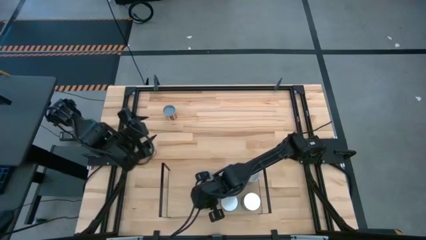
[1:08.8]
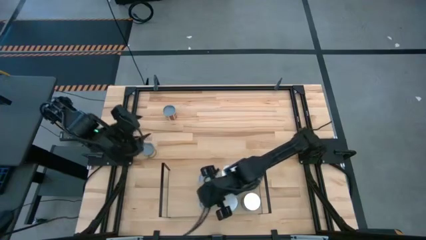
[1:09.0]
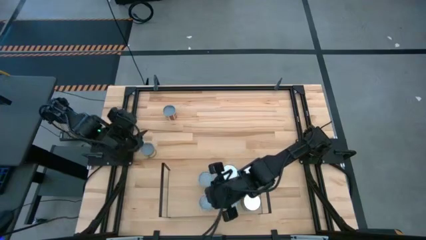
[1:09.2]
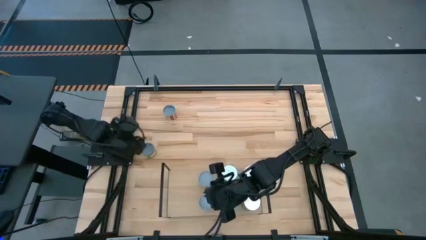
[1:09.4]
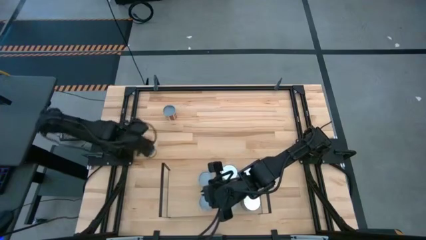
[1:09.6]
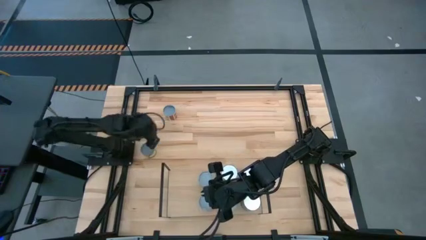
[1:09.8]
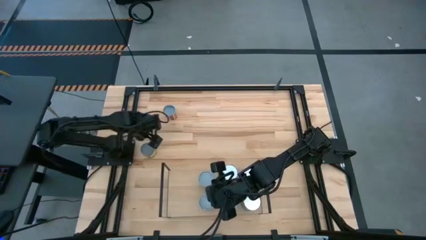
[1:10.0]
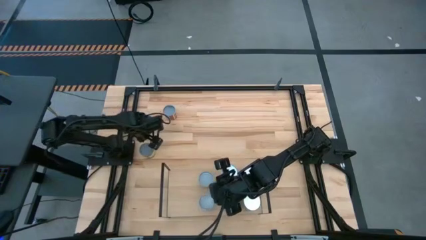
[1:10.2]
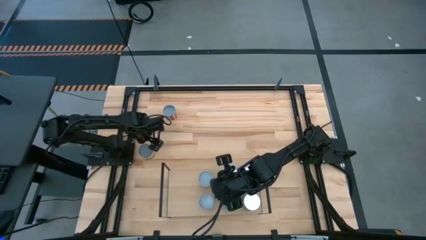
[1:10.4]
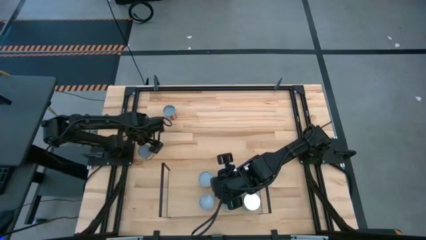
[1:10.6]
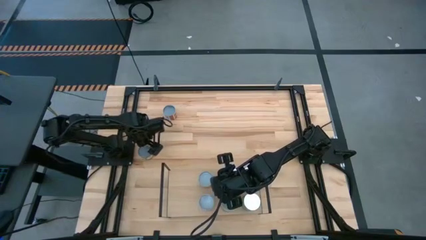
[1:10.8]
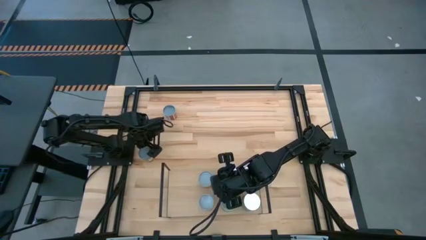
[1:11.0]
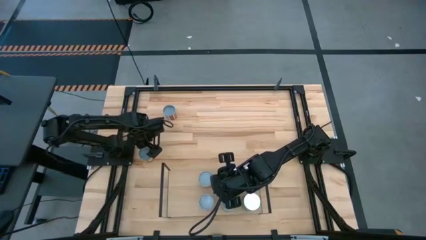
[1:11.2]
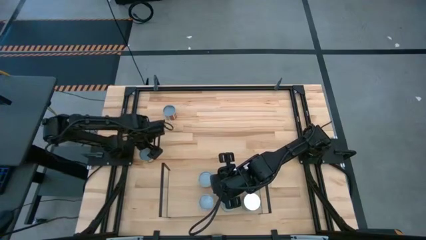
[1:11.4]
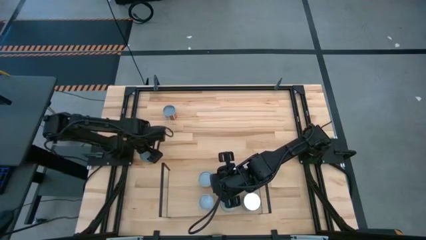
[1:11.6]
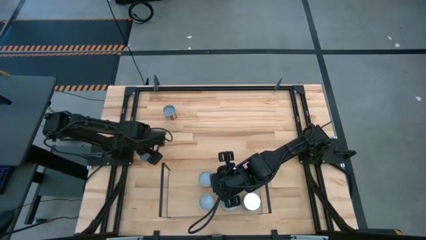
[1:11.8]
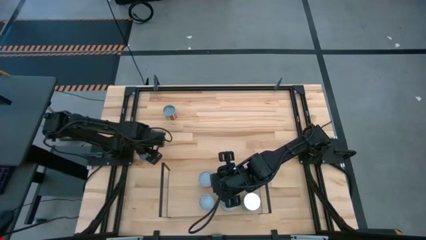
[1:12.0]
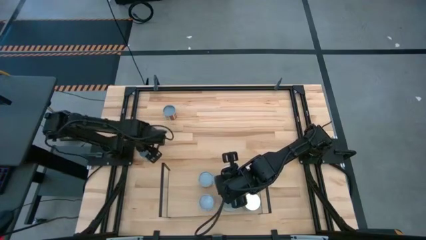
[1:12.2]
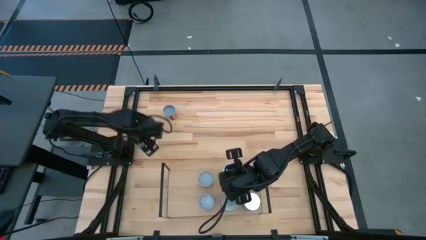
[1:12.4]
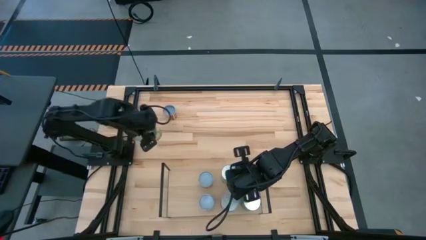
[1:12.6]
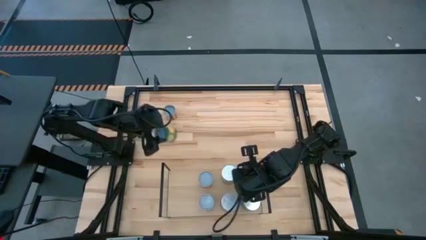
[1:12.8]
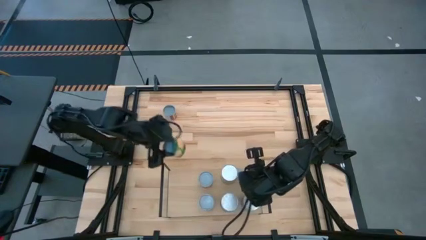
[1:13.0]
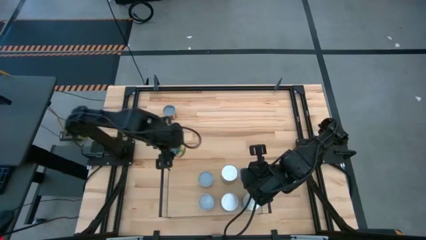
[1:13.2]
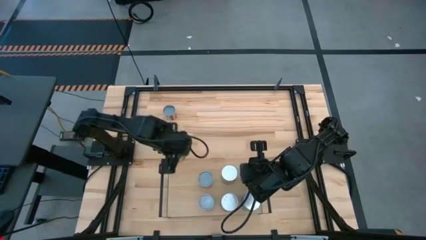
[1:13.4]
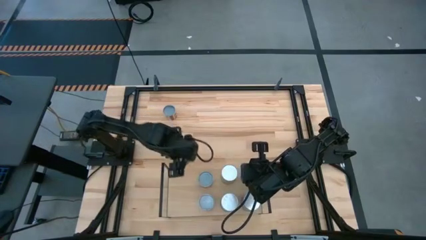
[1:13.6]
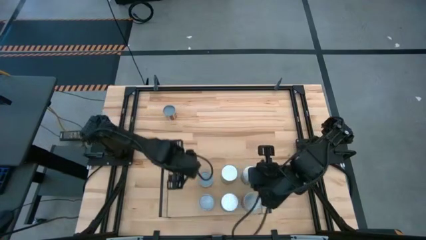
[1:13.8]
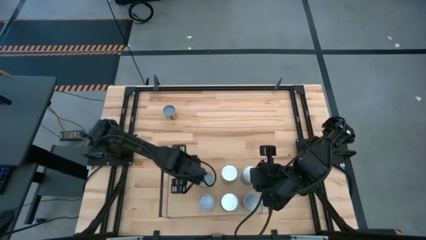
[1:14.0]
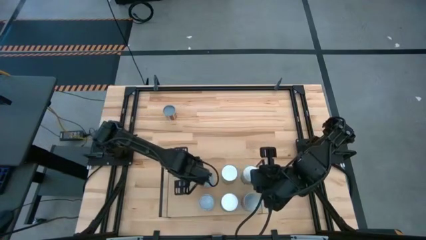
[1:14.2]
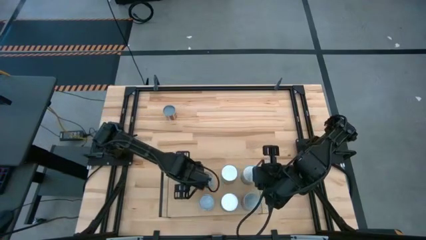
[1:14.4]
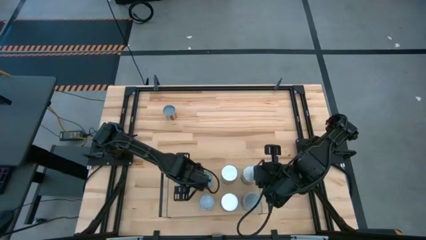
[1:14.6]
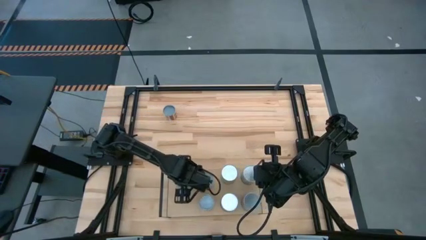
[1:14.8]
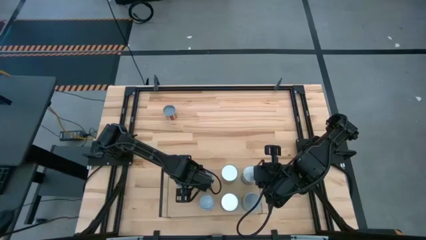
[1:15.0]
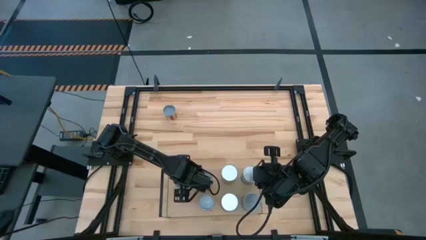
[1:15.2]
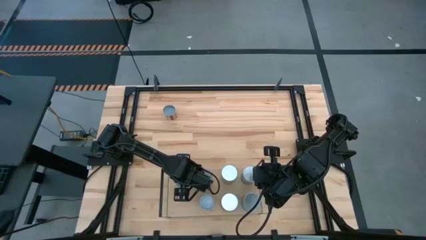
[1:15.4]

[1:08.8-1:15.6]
Task: Pick and place cans onto a shelf
Put the canned sliced peaches on the shelf

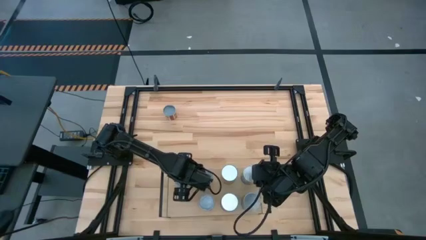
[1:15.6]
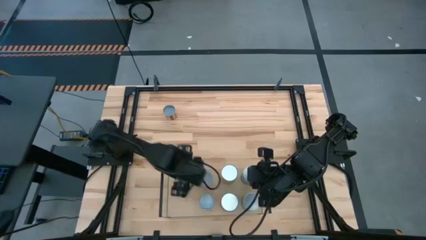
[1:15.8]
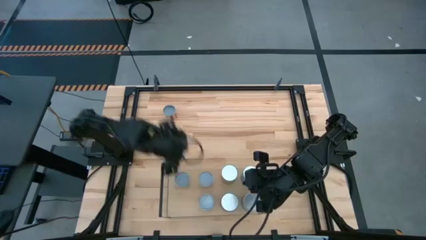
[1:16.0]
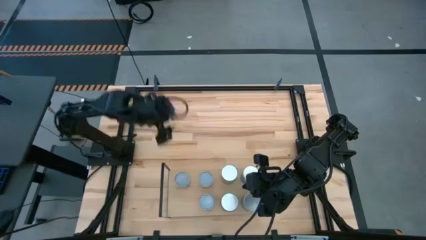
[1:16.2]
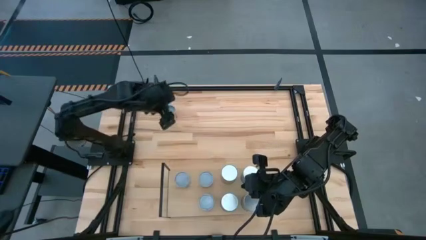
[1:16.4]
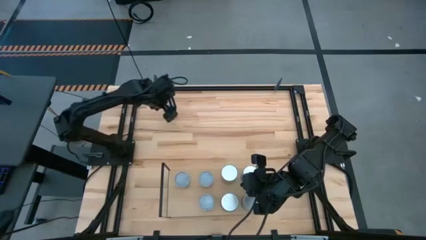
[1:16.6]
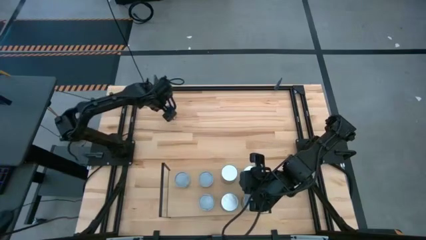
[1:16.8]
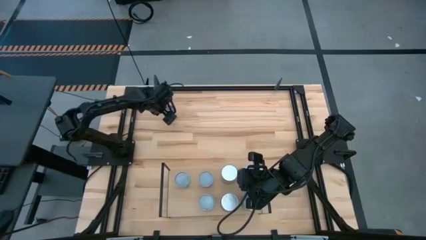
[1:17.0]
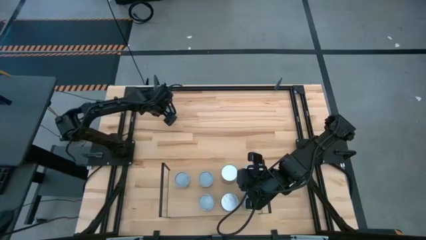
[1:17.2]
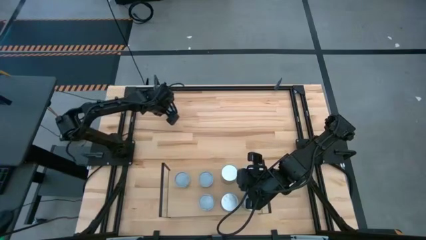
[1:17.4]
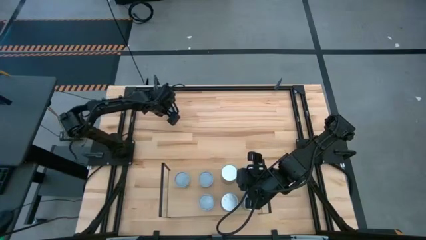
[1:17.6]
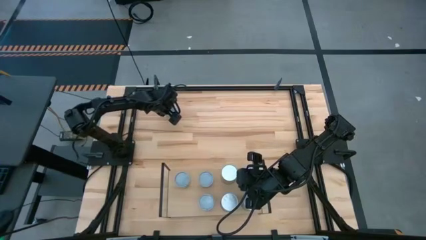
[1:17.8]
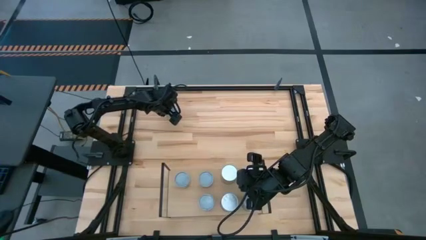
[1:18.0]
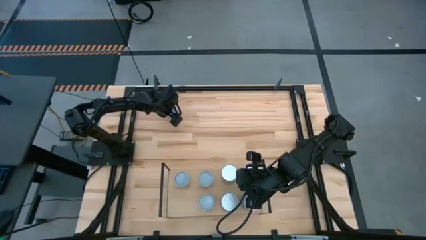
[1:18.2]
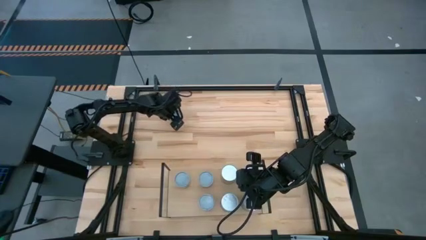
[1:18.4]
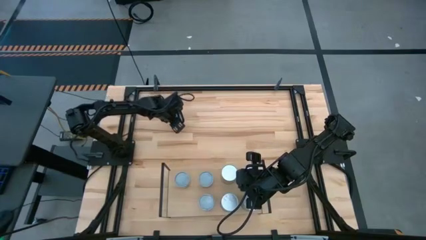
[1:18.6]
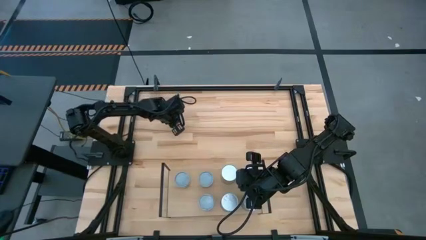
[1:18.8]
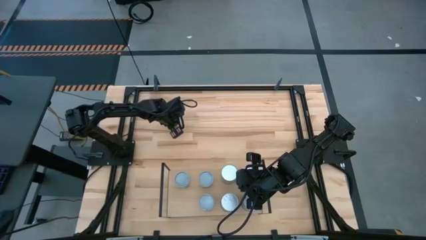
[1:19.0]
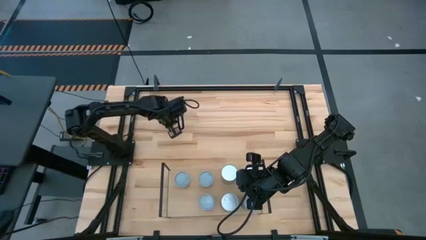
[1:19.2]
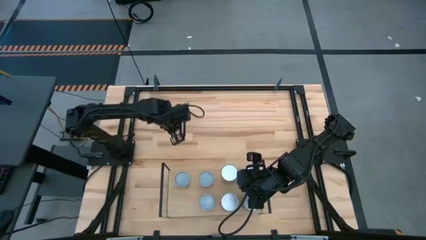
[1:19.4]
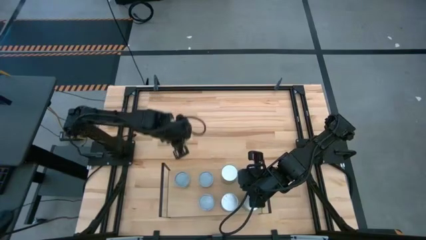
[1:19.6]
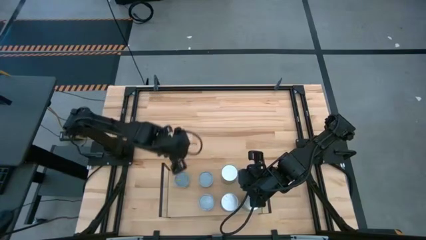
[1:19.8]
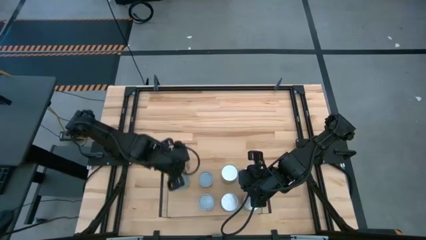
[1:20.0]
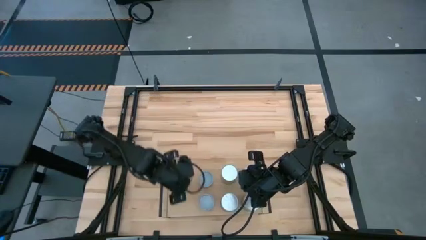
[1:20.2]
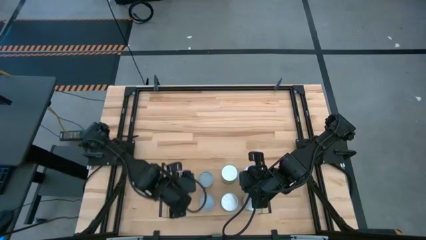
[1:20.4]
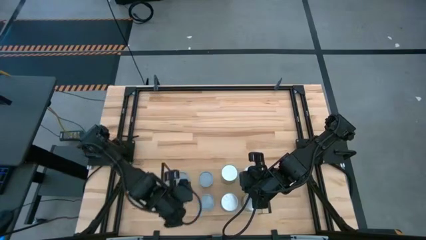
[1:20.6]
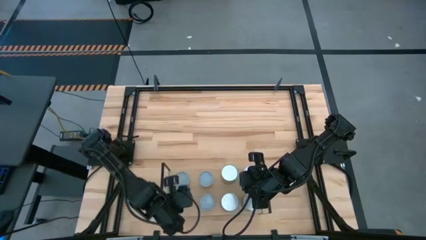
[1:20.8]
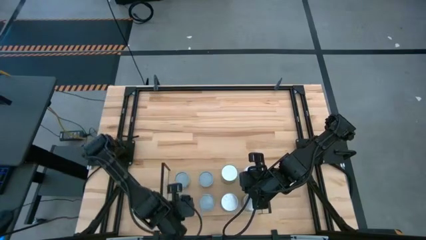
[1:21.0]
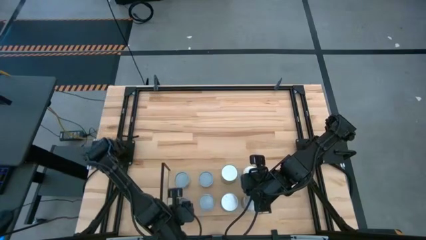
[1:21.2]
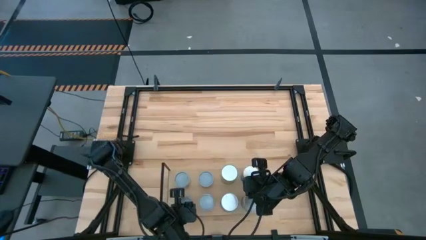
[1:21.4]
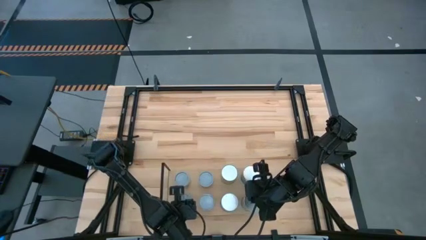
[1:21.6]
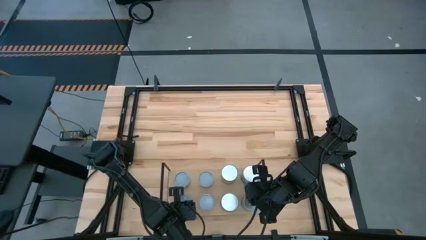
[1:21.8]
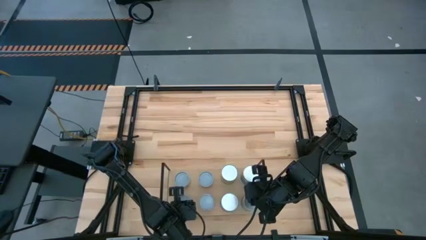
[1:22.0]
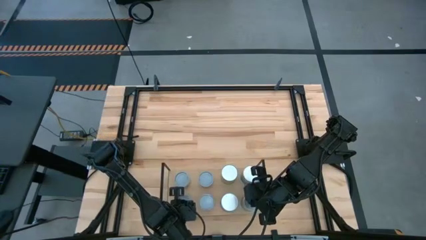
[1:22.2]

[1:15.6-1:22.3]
Put the canned diced tomatoes on the shelf

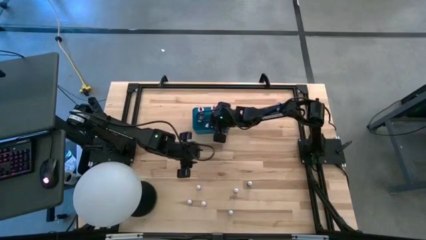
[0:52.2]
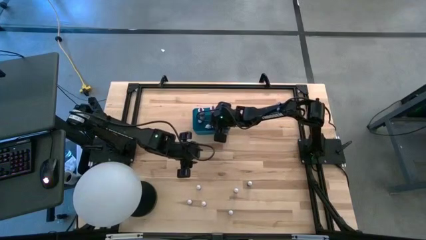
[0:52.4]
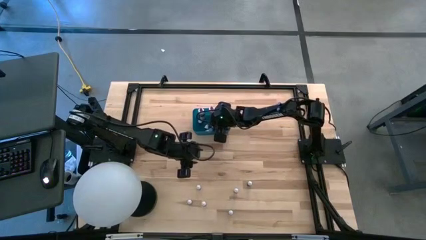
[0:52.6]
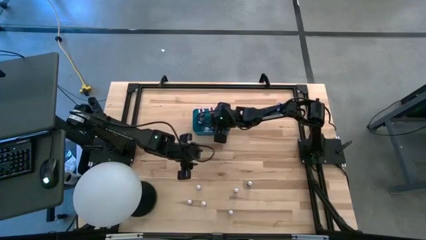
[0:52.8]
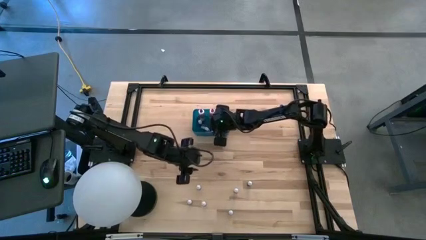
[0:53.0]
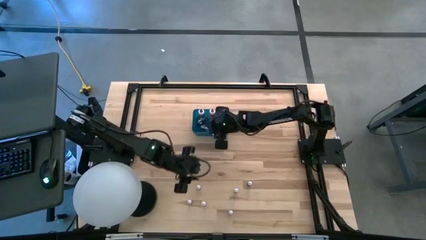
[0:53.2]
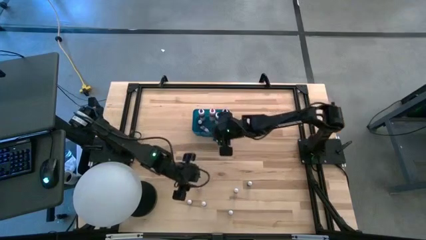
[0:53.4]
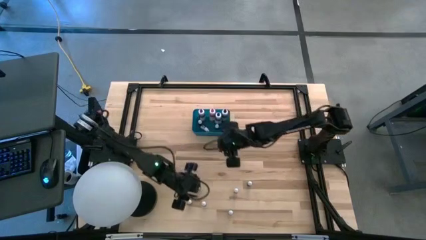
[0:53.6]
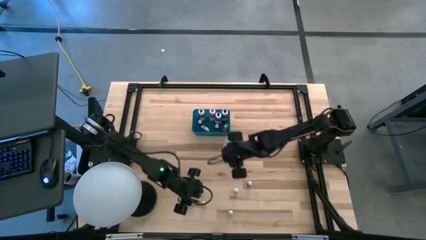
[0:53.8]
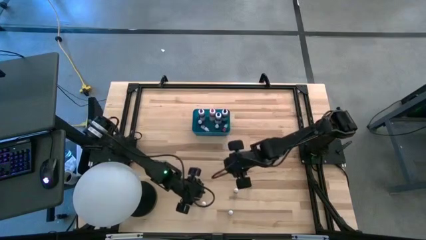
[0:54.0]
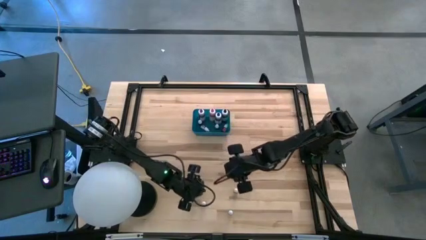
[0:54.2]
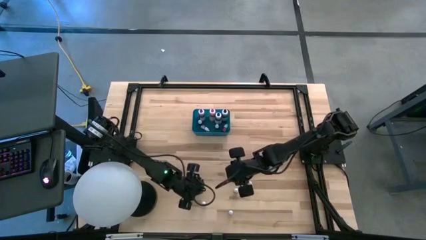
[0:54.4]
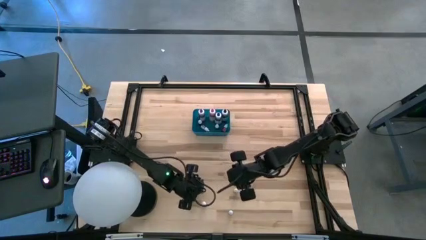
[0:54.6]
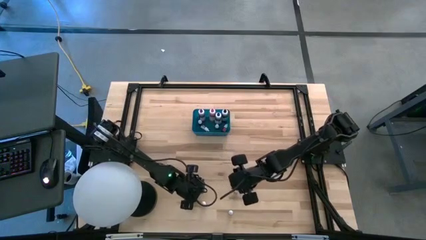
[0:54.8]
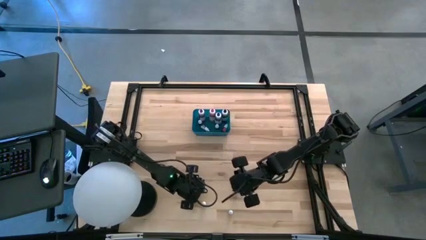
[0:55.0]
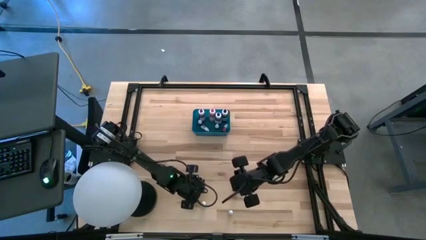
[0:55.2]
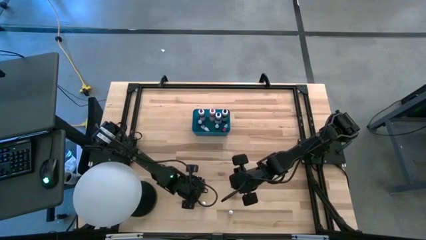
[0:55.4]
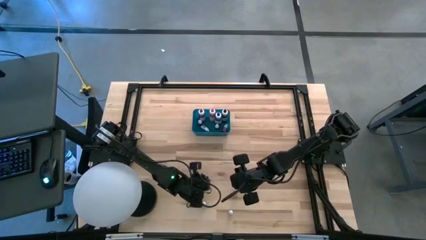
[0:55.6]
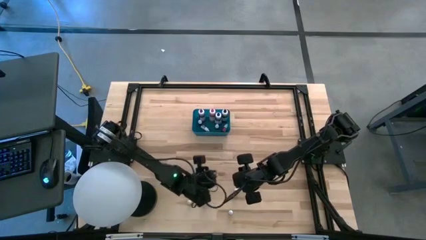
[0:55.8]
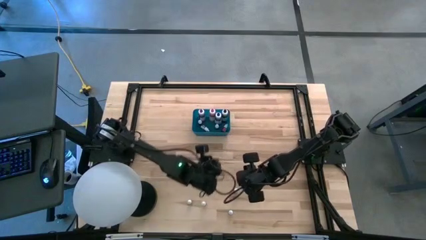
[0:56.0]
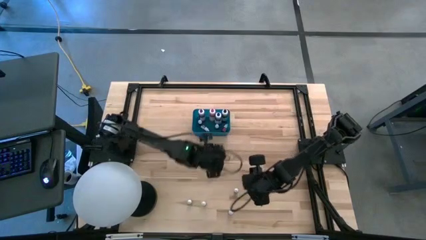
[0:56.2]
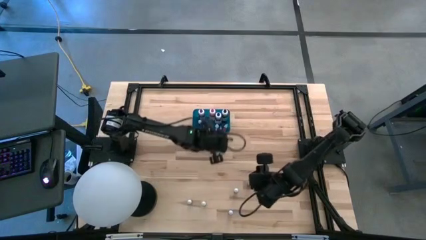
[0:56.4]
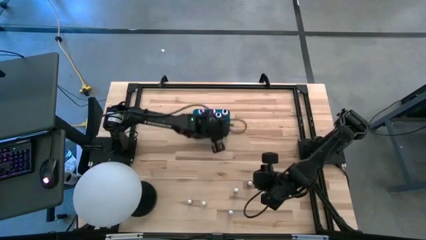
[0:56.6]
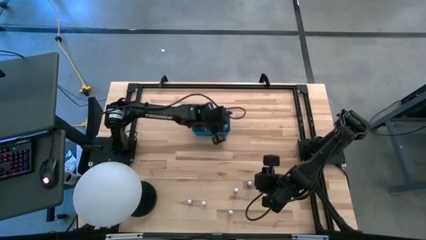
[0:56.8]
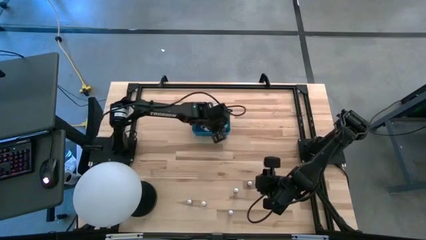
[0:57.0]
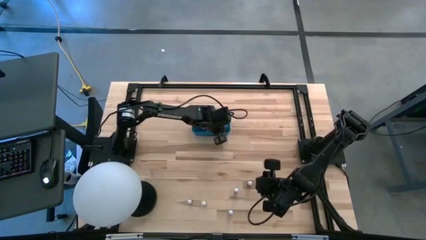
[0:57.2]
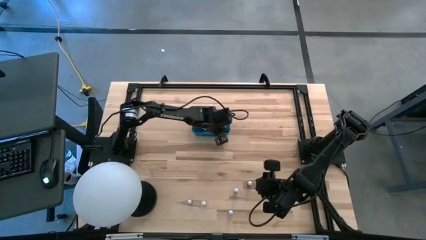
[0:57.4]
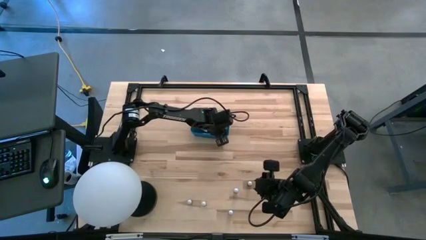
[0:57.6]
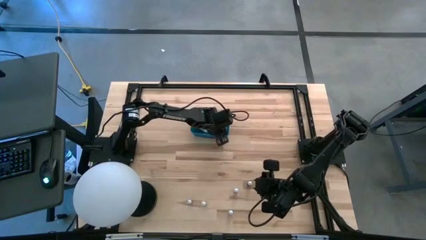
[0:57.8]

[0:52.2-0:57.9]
Task: Pick & Place food coloring
Put the blue food coloring bottle into the blue bin
